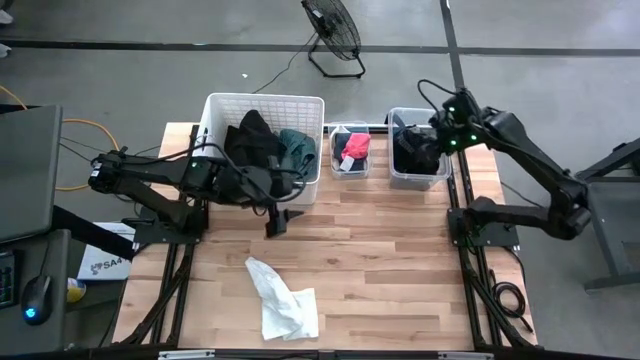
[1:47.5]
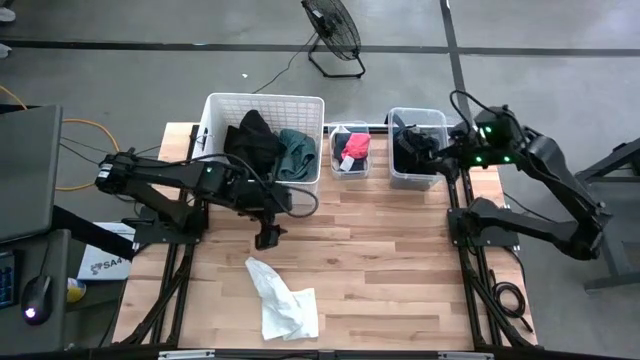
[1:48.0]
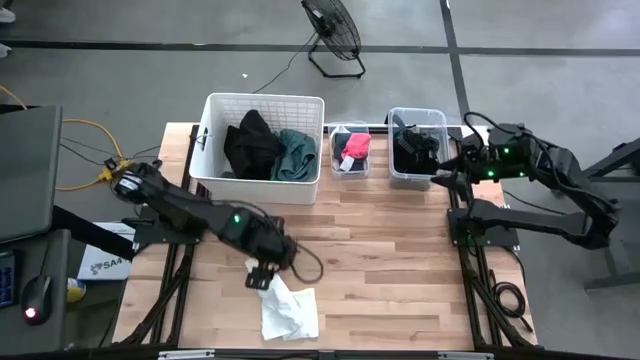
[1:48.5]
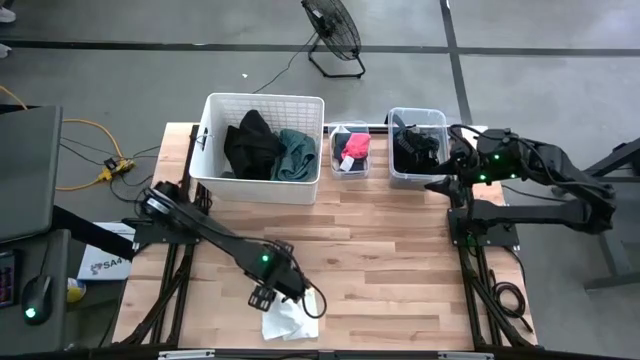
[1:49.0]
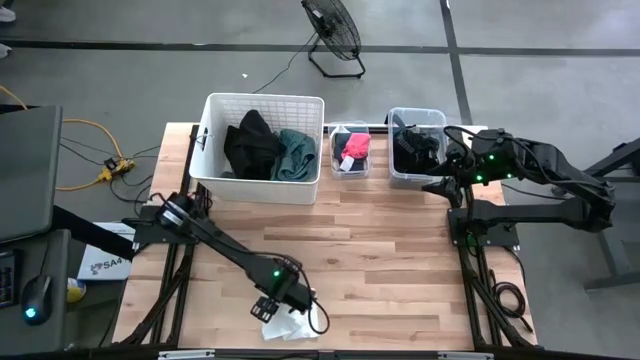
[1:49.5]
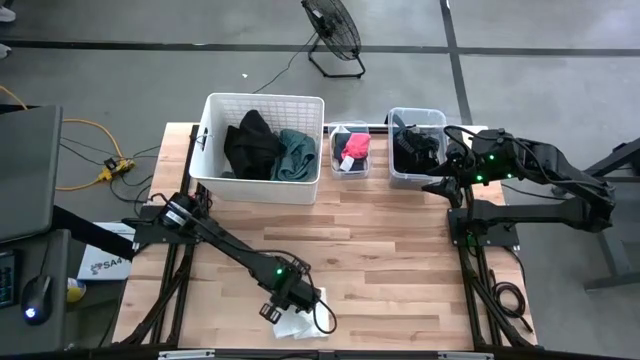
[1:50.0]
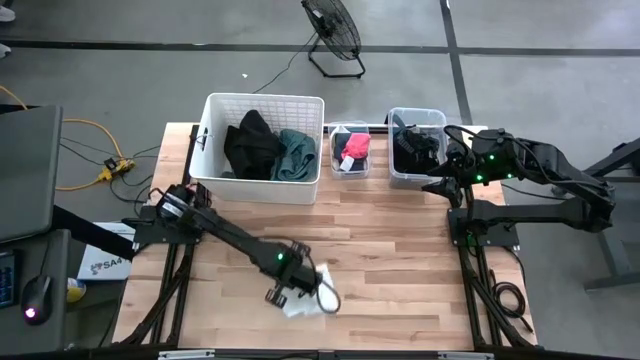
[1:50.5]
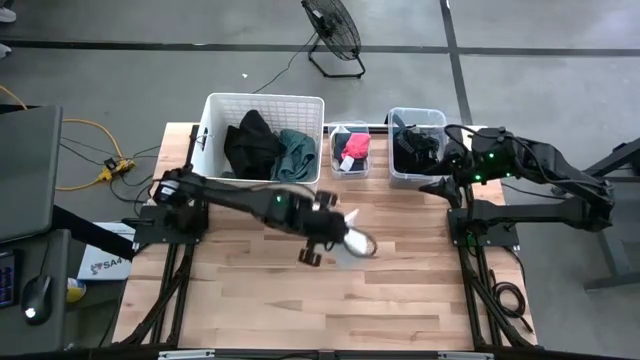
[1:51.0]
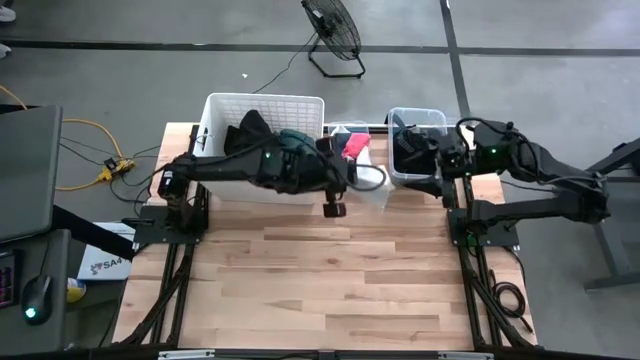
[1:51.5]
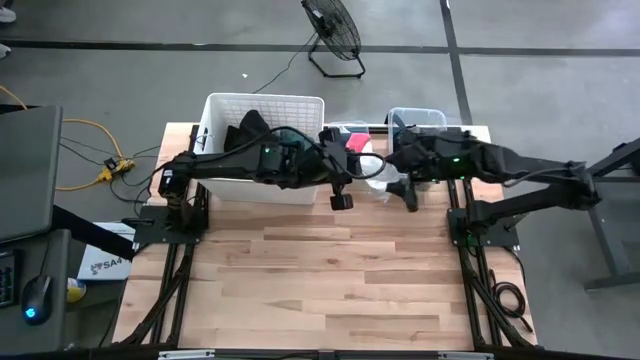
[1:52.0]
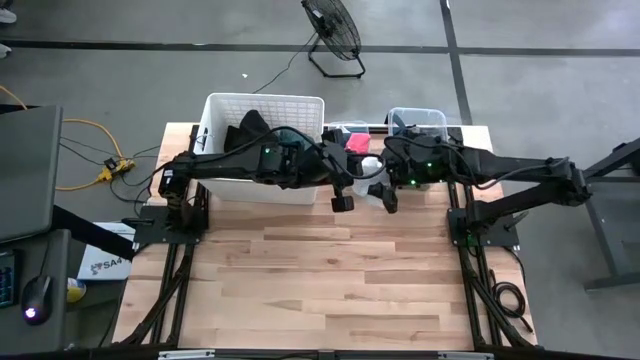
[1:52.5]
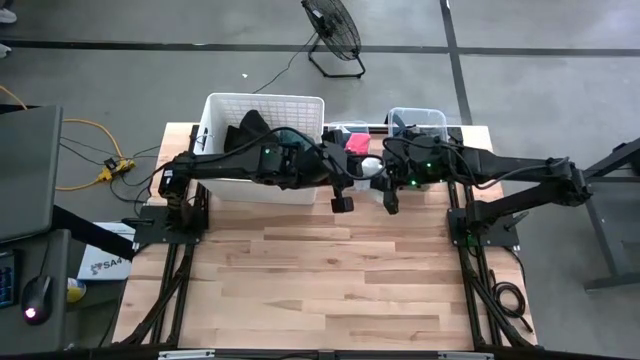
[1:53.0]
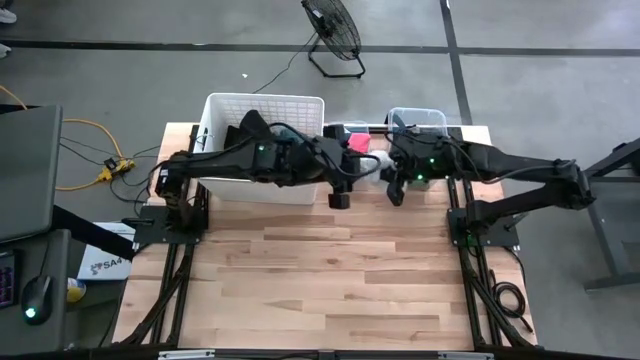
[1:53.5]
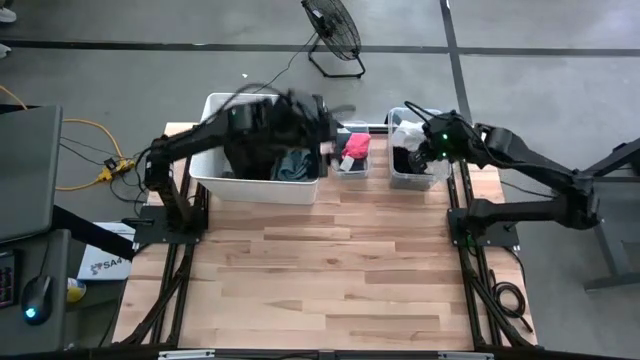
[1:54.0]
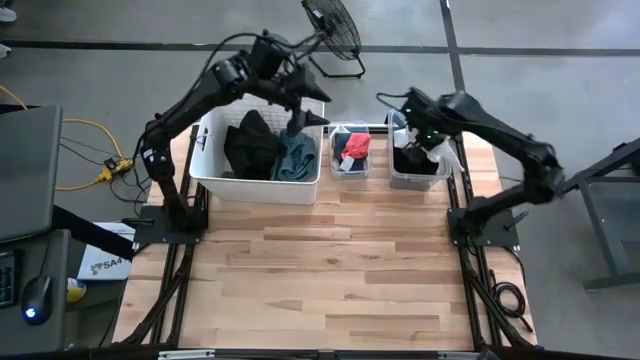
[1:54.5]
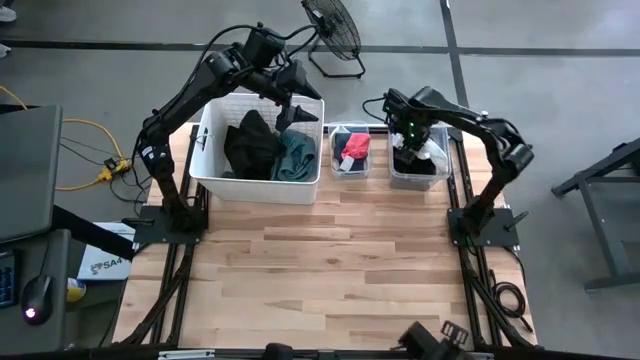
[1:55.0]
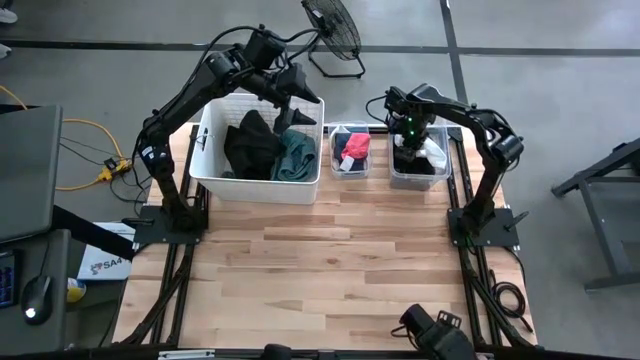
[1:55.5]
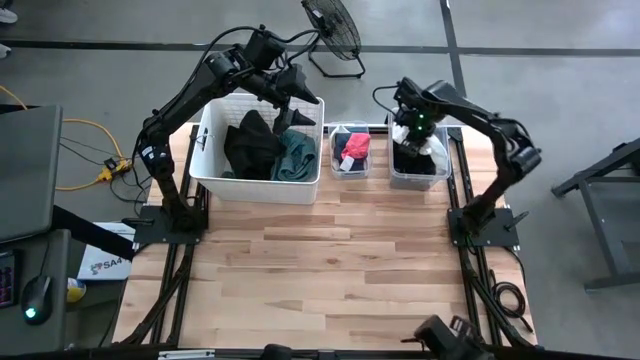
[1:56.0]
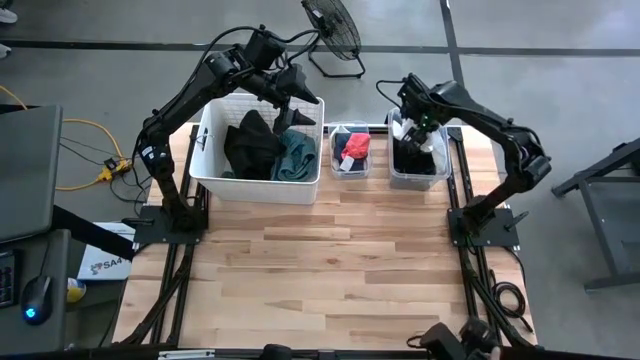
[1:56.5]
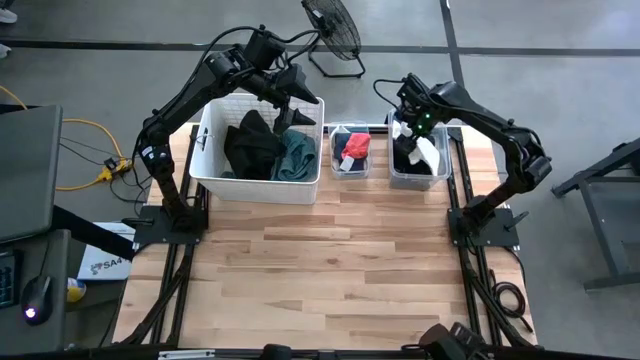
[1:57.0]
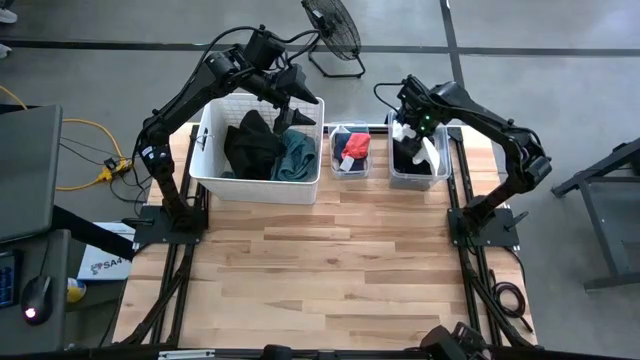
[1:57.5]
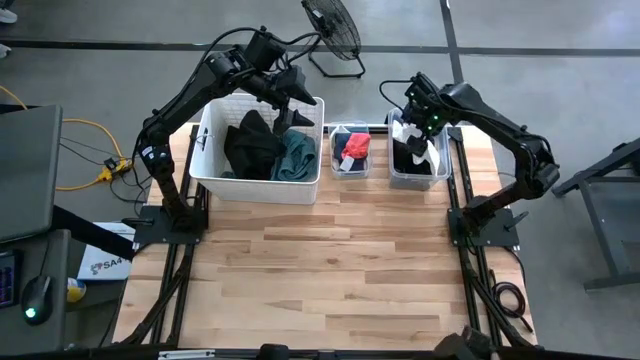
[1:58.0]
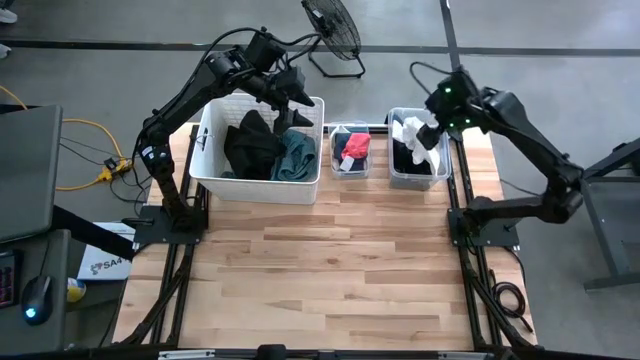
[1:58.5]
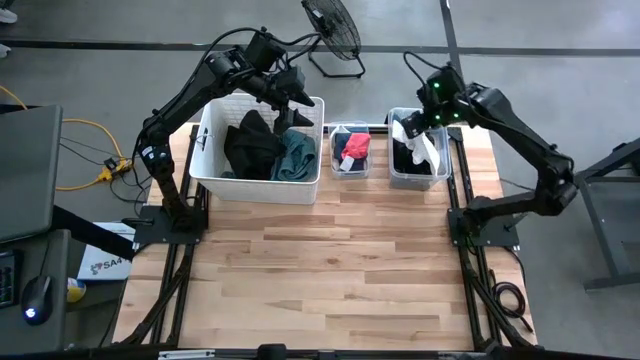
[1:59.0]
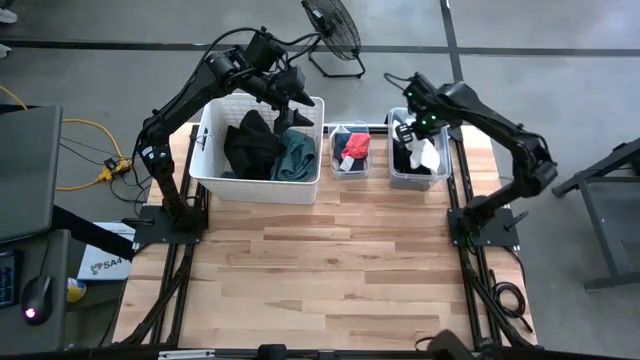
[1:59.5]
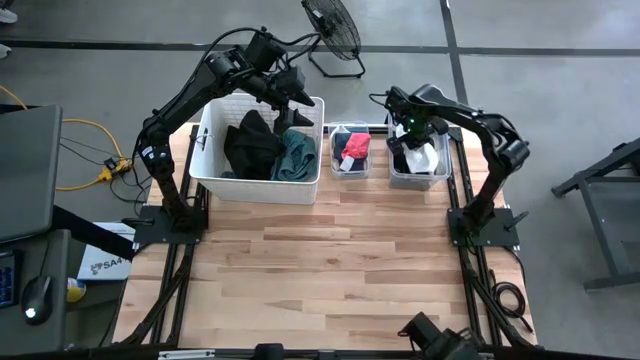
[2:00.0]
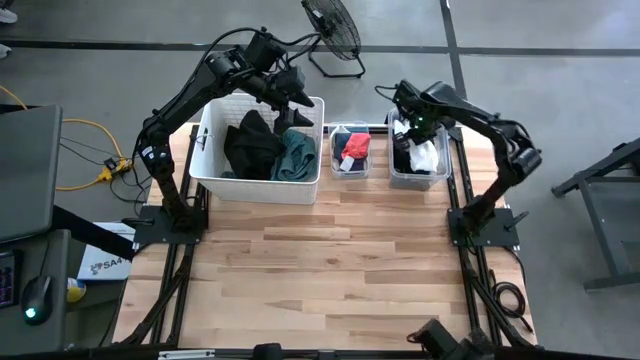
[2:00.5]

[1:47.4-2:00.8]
Task: Pick & Place Cloths
Put the white boxer short into the right transparent bin

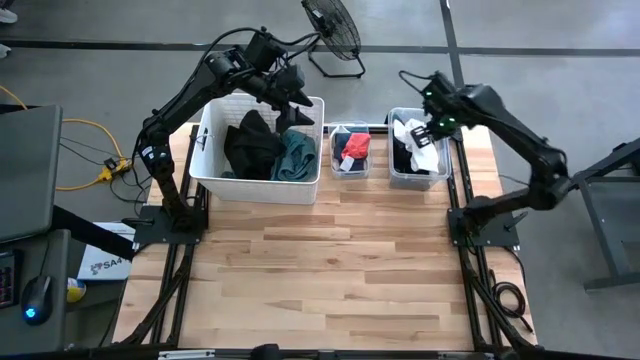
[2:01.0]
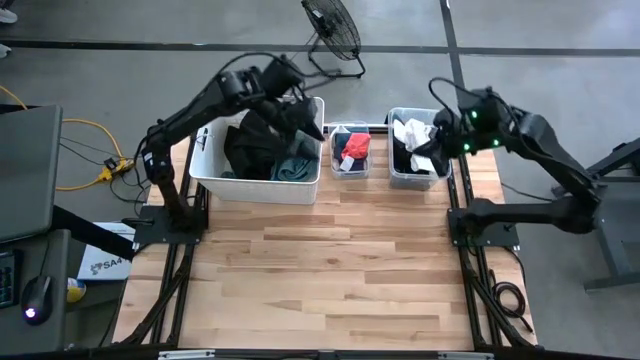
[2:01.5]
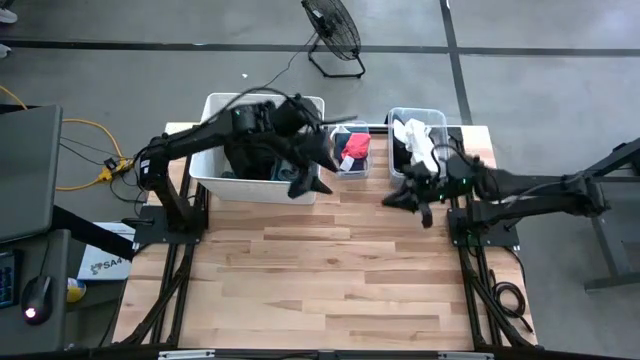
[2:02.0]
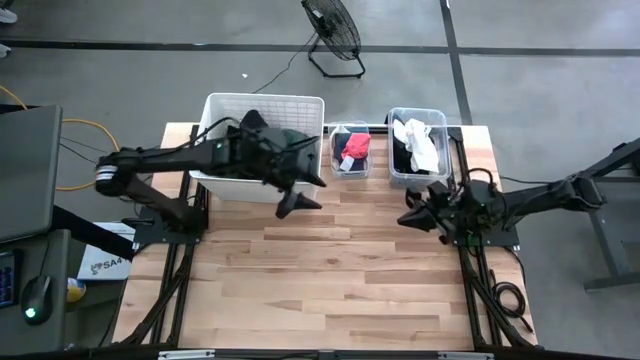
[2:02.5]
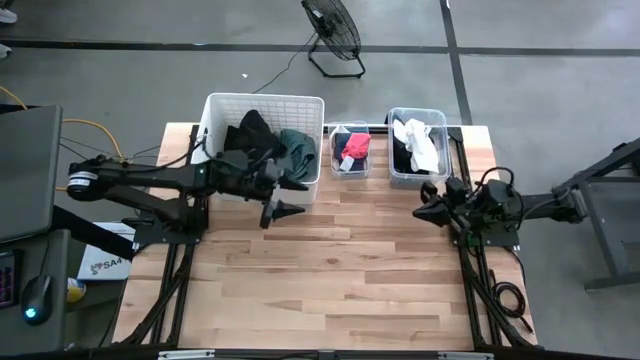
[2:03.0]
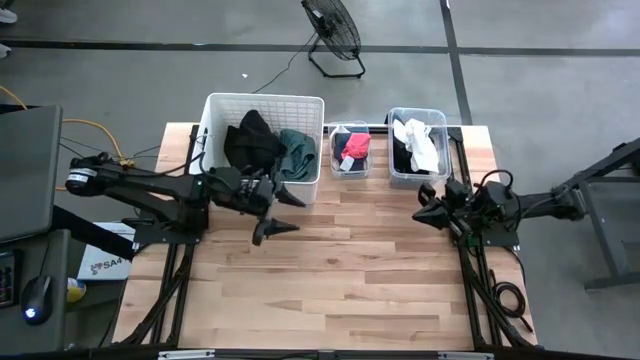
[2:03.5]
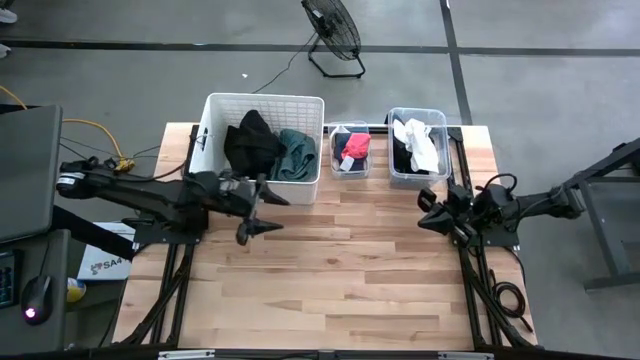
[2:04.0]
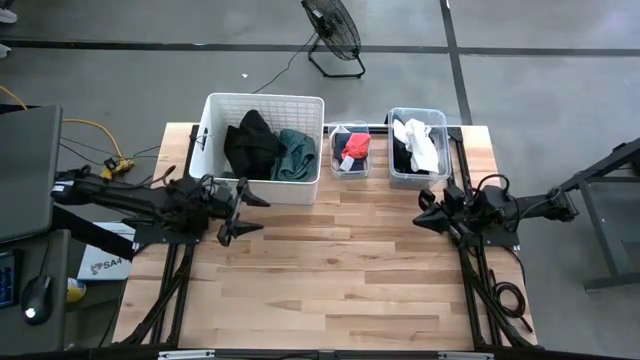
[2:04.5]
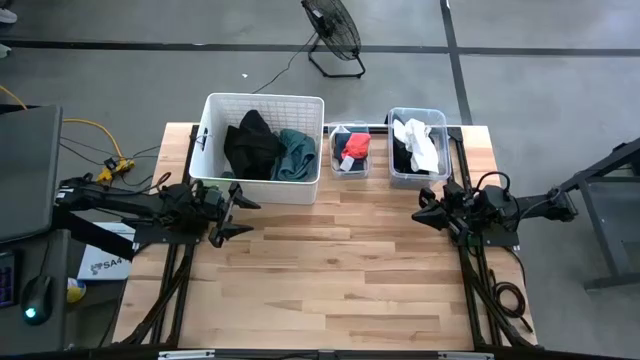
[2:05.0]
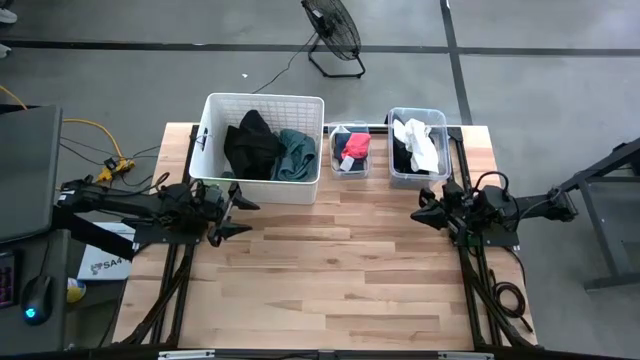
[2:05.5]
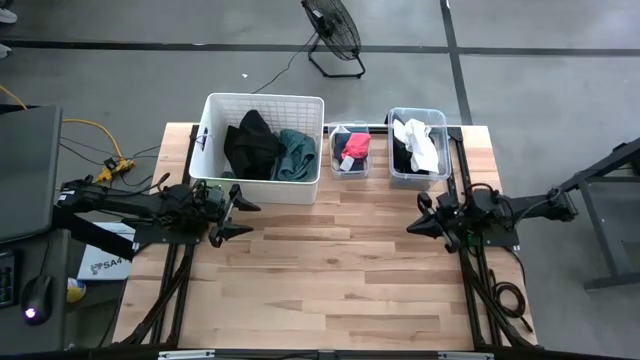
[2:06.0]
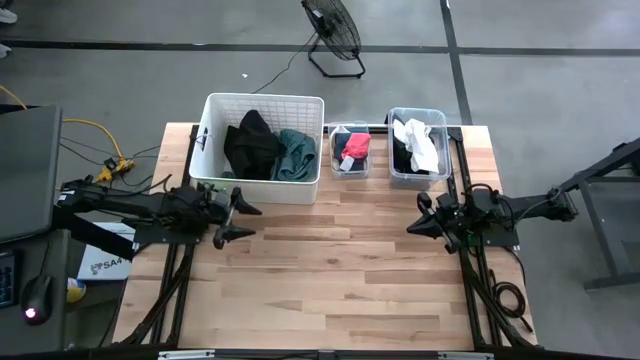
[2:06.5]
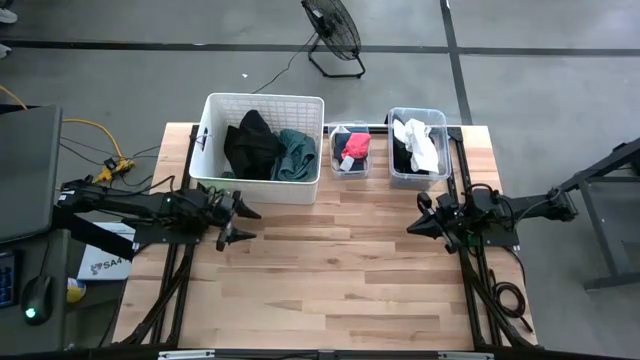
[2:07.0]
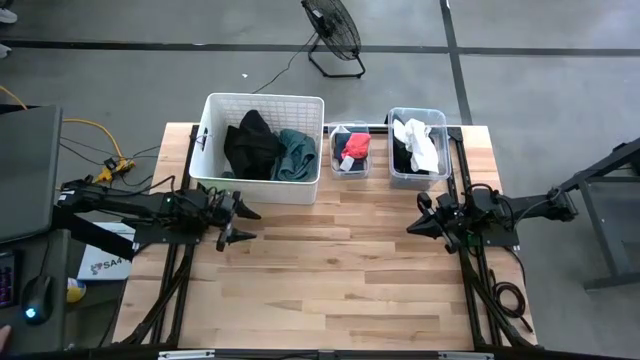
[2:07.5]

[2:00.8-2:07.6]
Return to Home Position

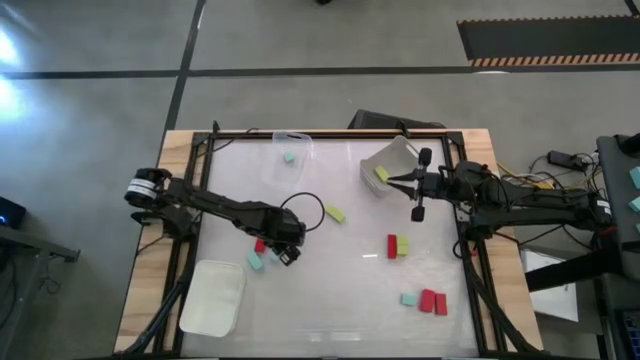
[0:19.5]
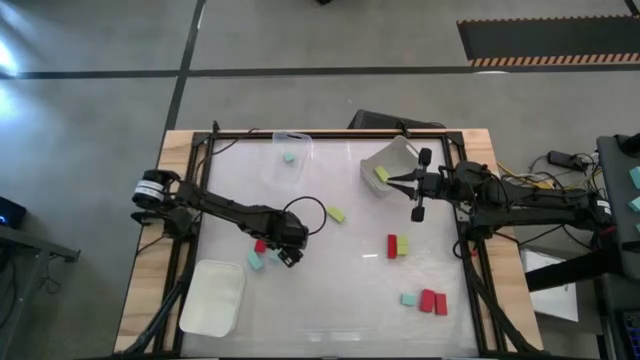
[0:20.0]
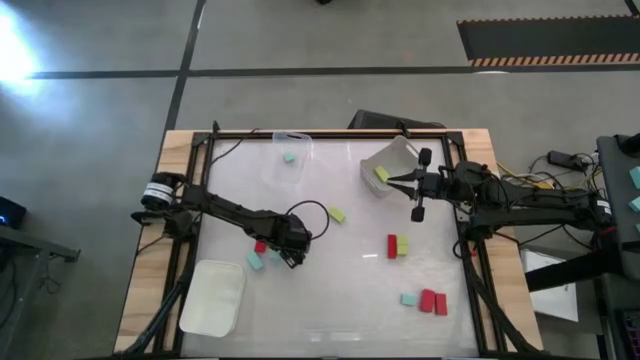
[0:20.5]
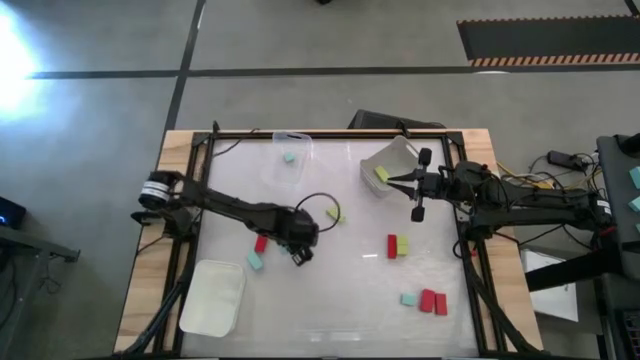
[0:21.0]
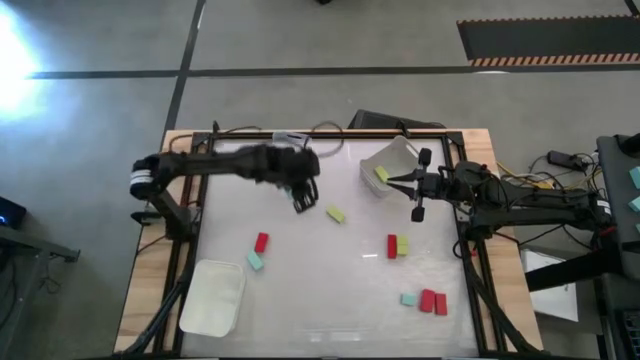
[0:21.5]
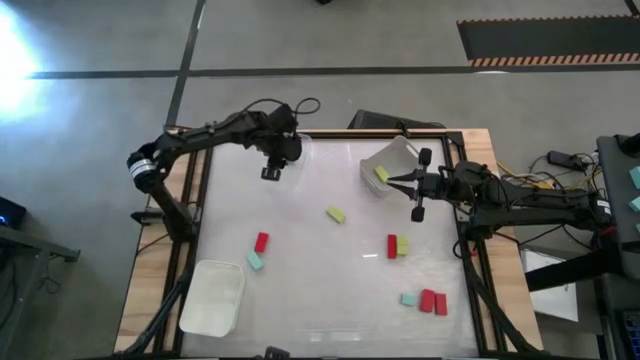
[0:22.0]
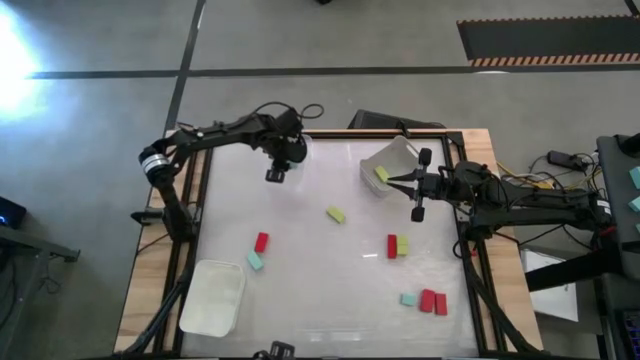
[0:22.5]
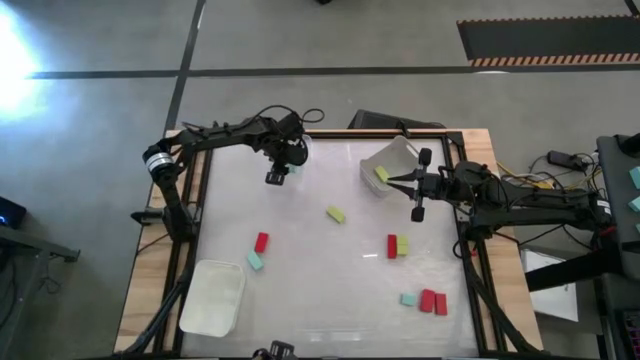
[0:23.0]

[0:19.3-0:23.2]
Task: Sort & place blocks by color
Put the light blue block into the transparent bin
